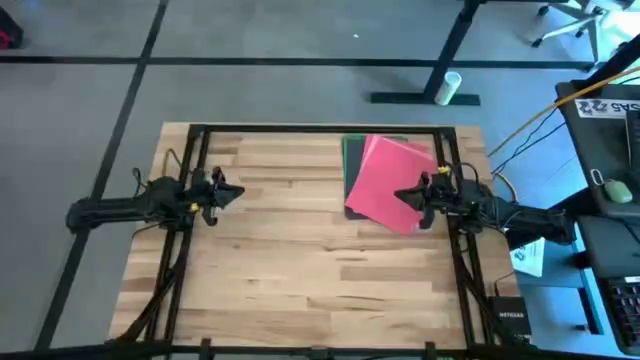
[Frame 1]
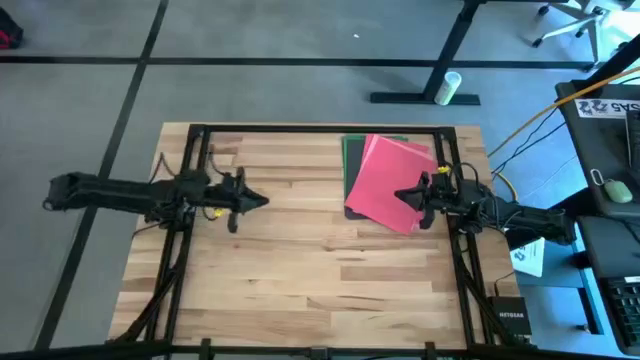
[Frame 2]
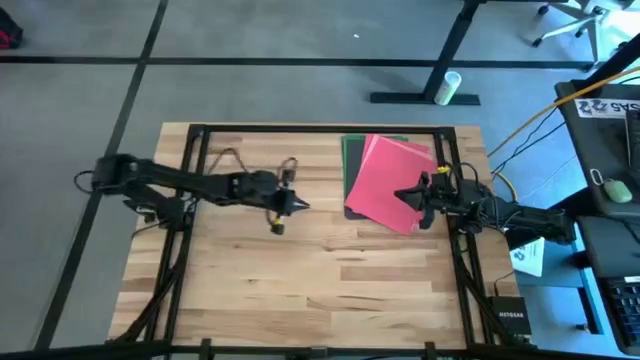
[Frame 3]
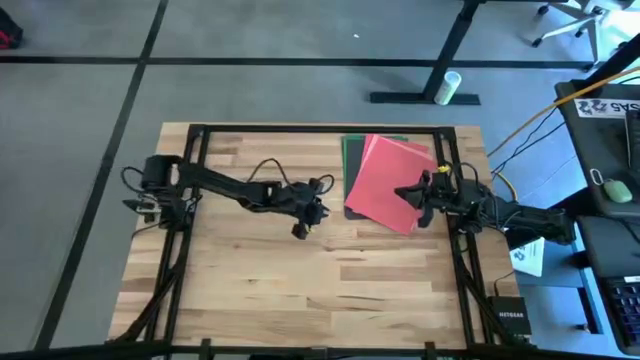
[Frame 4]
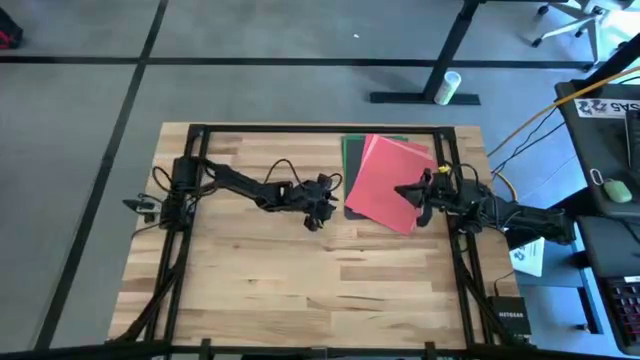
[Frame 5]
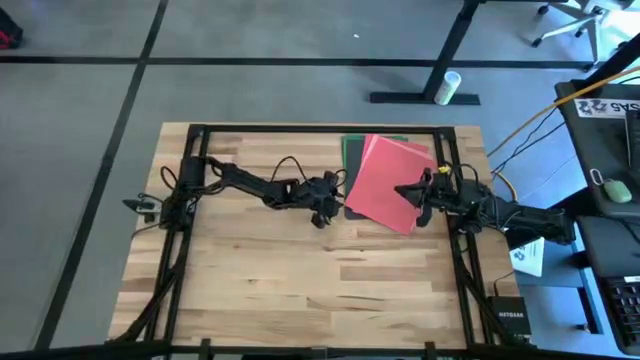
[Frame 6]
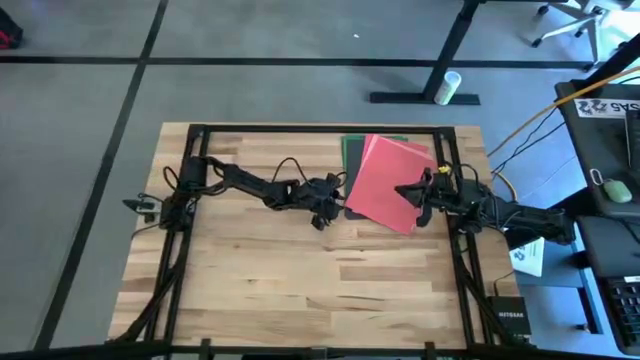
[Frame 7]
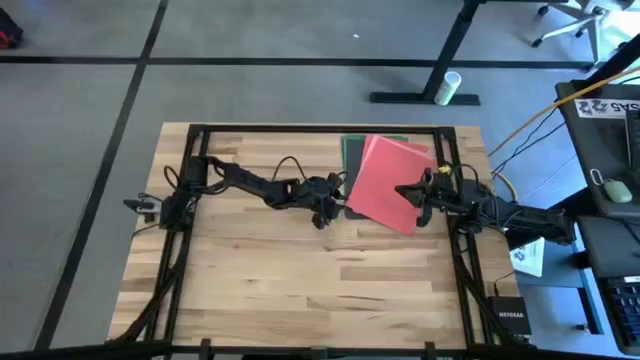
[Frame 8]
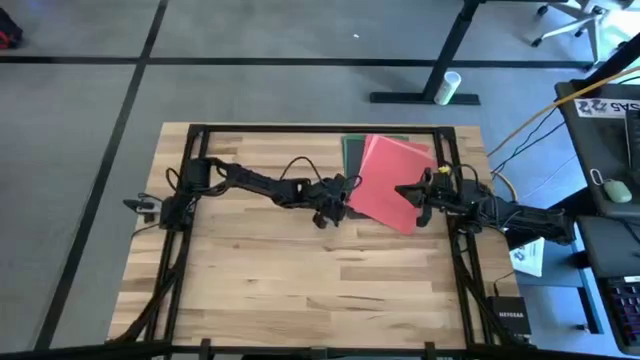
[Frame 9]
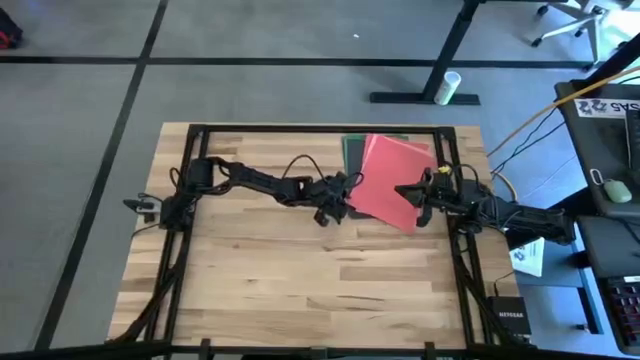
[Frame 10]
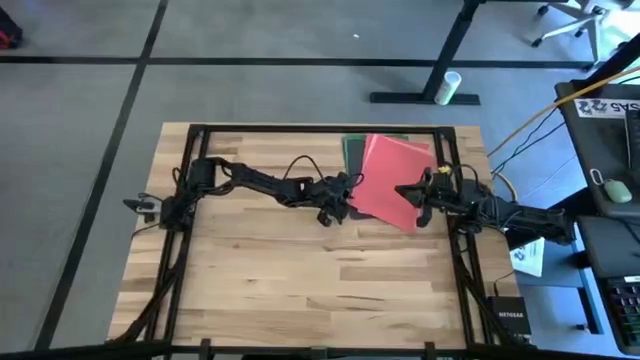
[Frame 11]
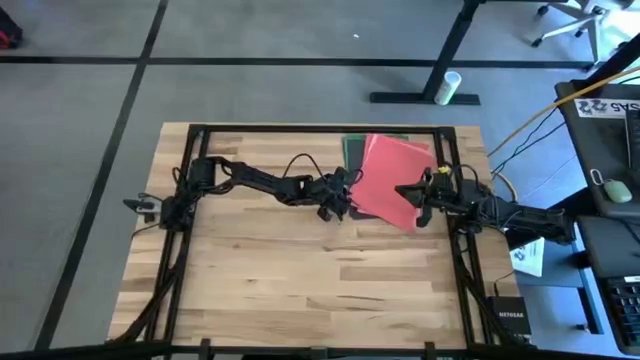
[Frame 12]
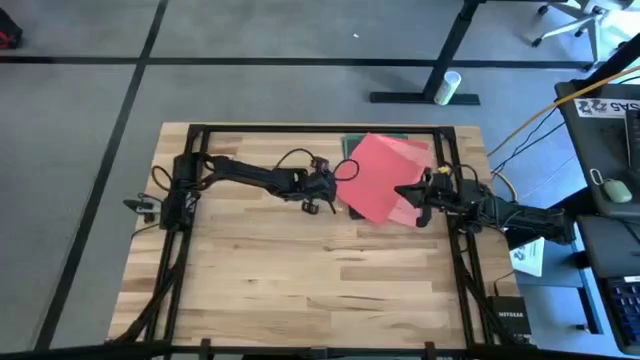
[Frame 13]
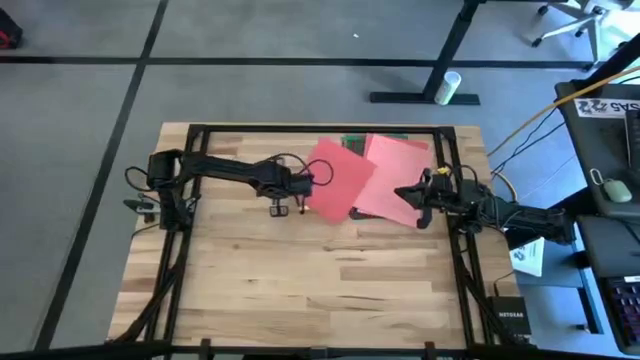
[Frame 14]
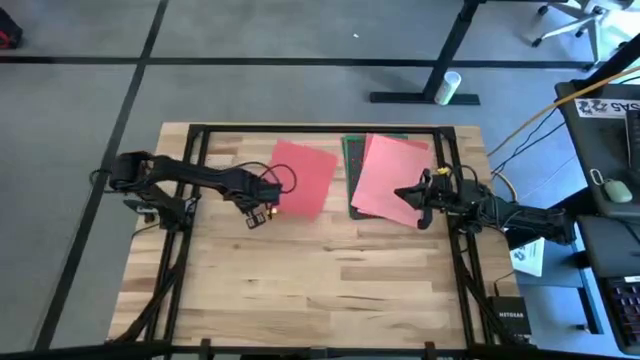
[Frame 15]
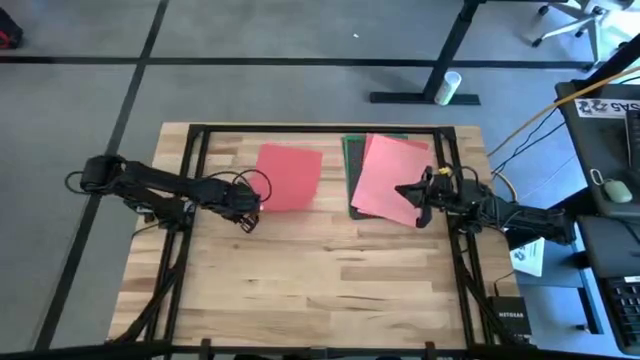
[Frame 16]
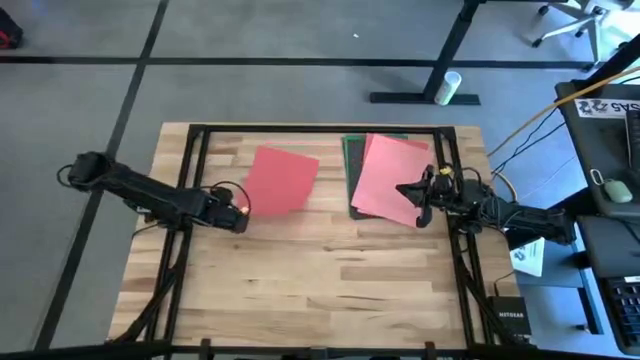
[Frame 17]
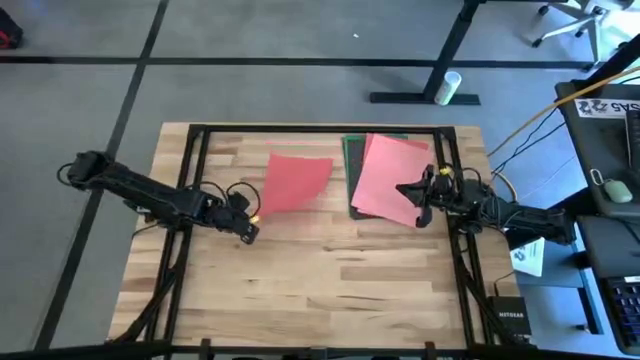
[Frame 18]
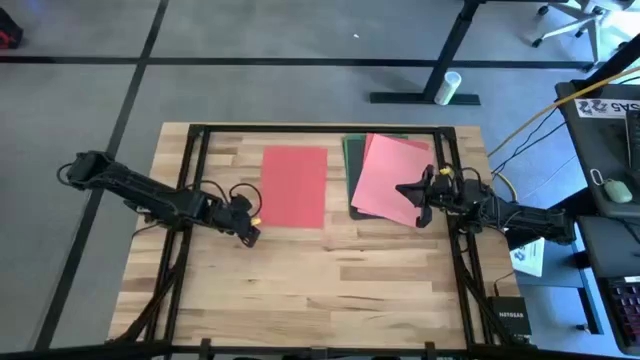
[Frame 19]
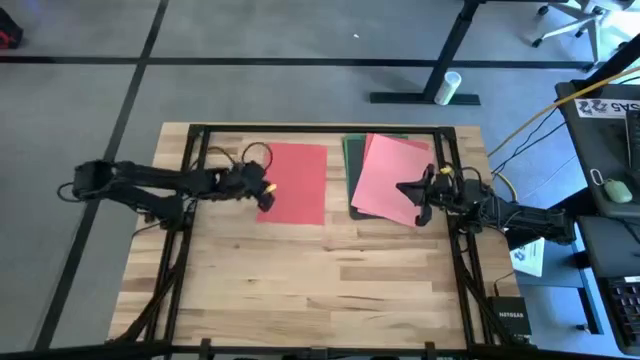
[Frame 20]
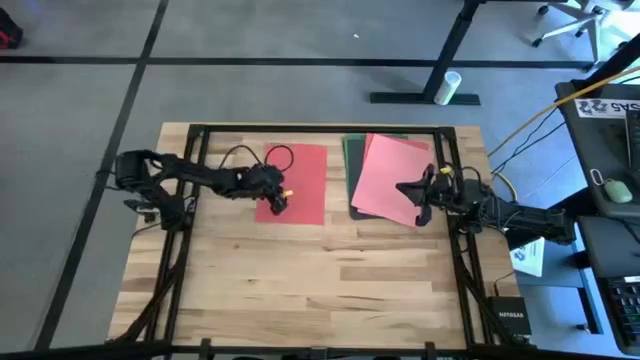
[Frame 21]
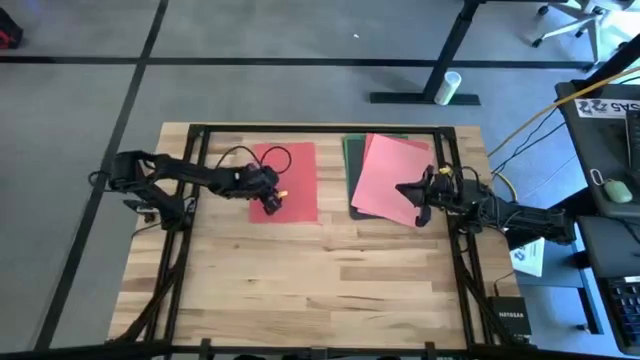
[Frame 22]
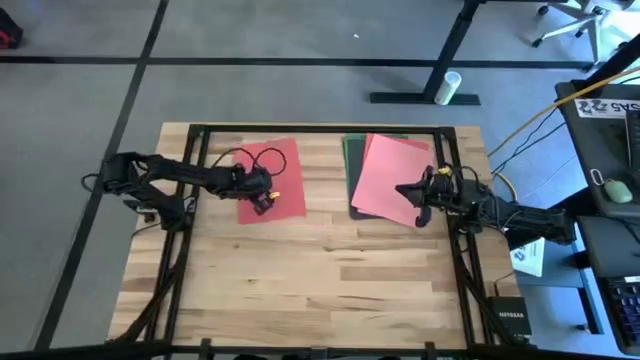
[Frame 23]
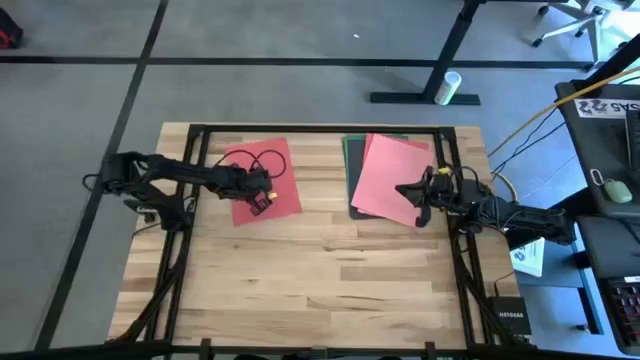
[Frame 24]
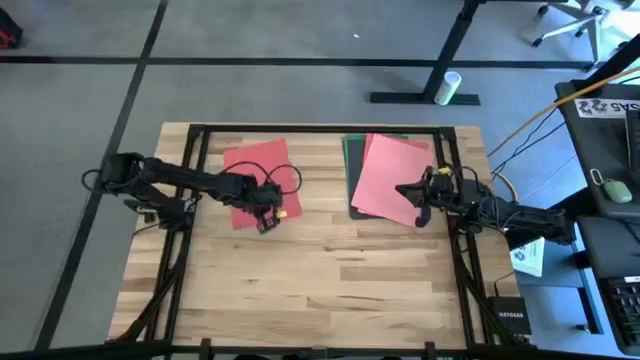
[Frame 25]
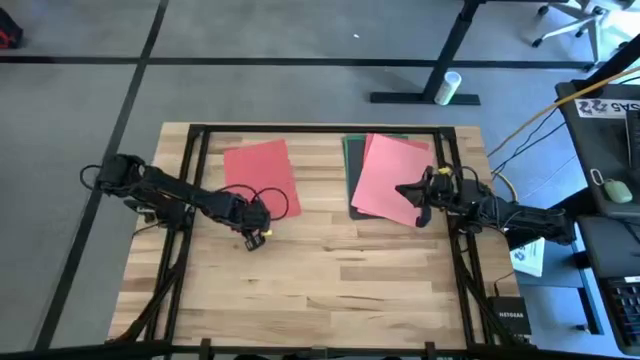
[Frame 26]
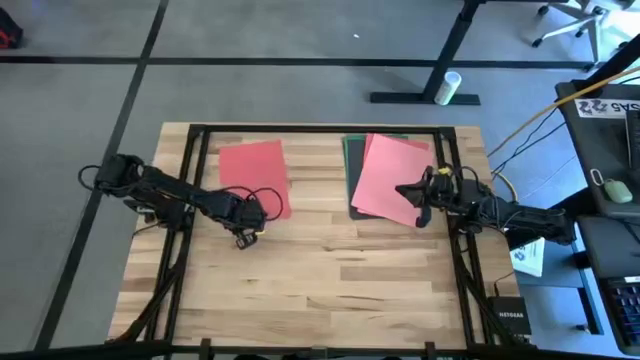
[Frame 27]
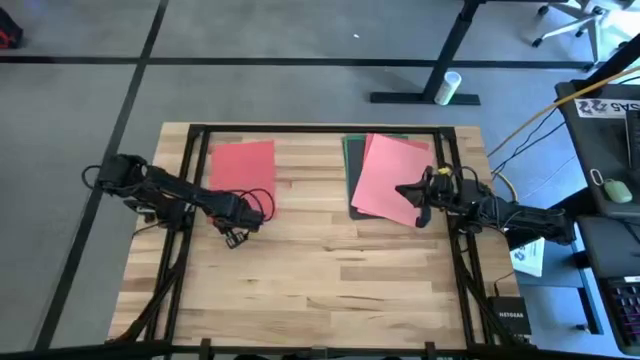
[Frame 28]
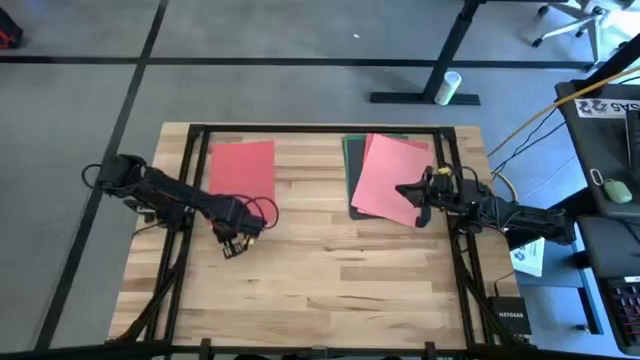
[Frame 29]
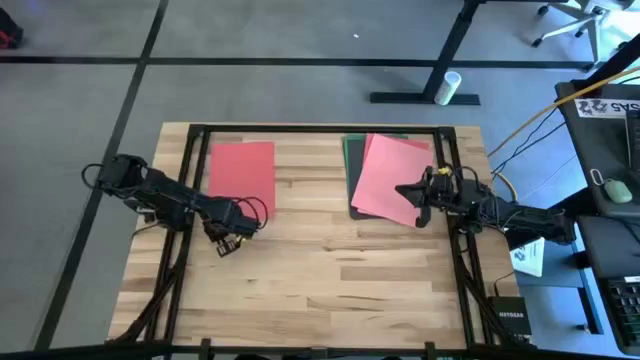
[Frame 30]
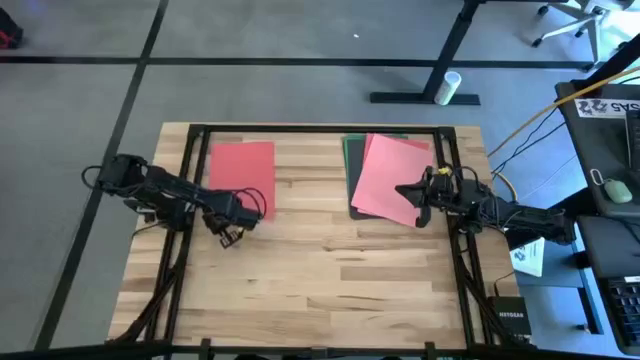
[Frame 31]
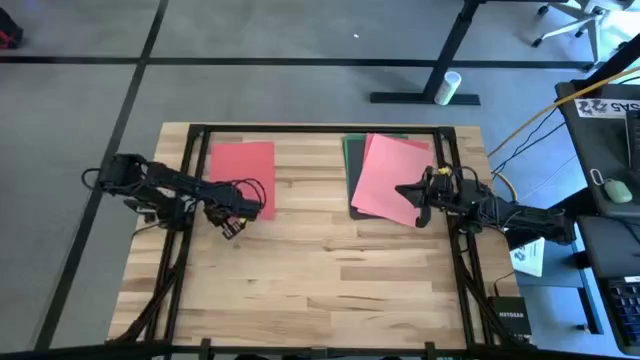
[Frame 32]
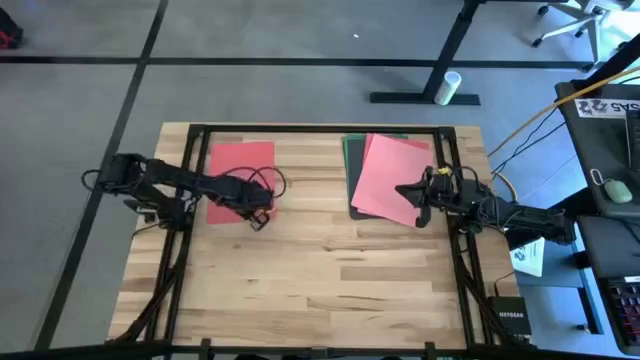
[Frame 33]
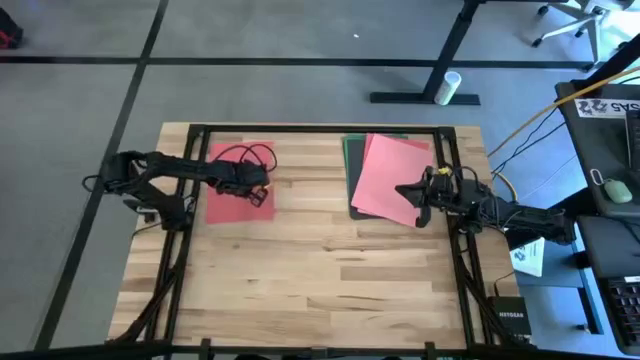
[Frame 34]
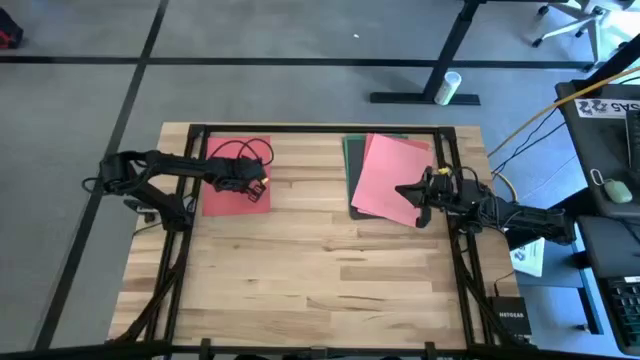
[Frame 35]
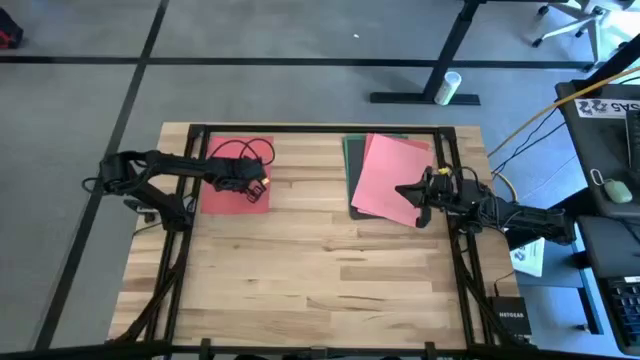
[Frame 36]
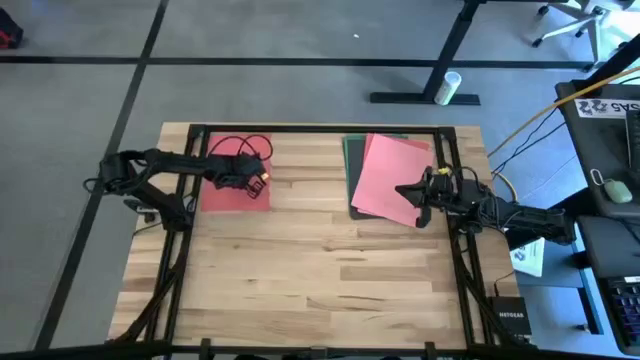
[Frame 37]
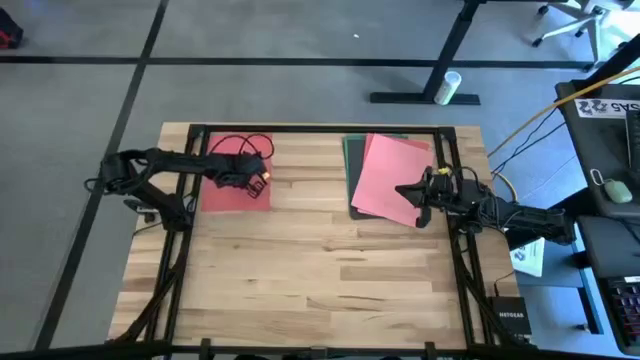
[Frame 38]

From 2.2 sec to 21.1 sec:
Task: Organize paper
Put the red paper on the top left of the table
